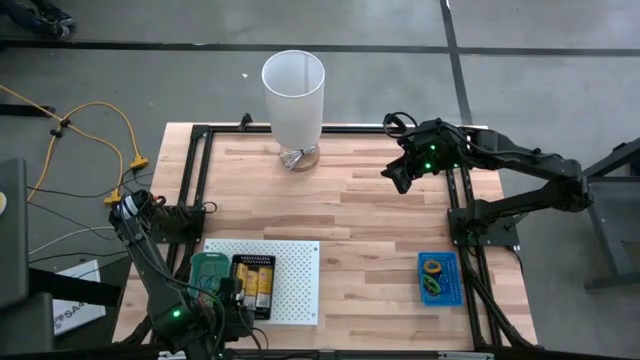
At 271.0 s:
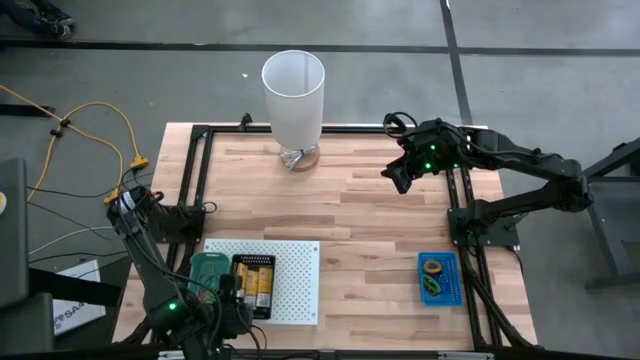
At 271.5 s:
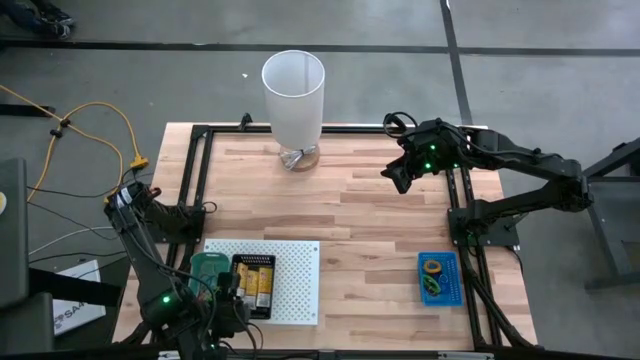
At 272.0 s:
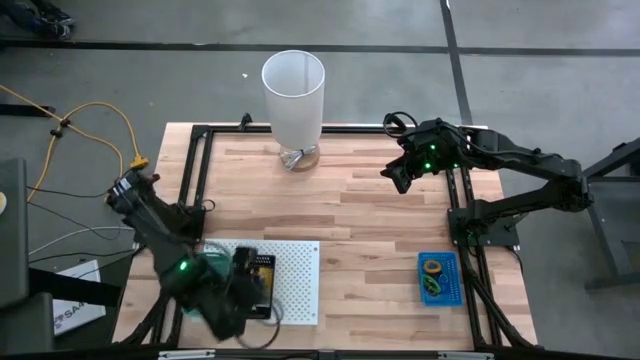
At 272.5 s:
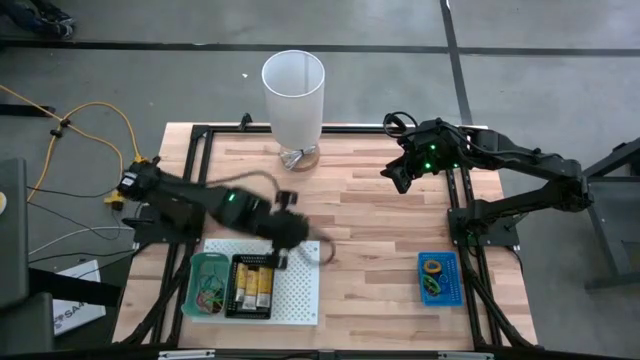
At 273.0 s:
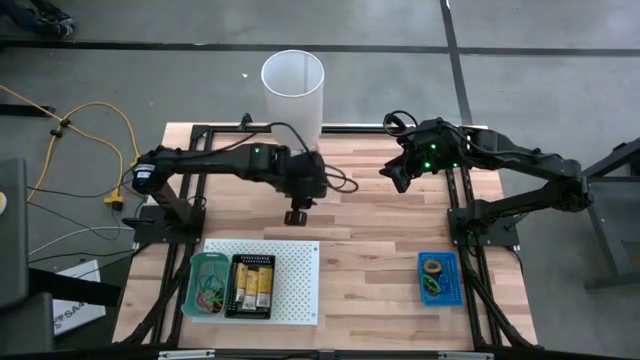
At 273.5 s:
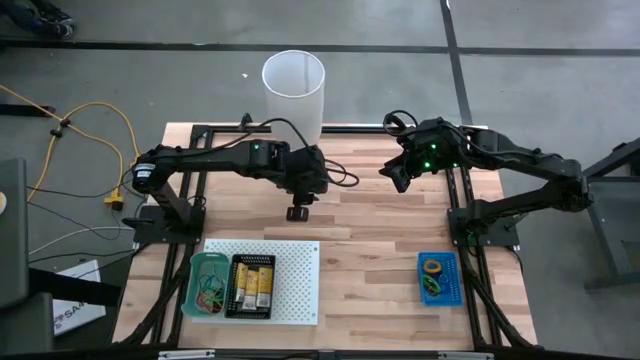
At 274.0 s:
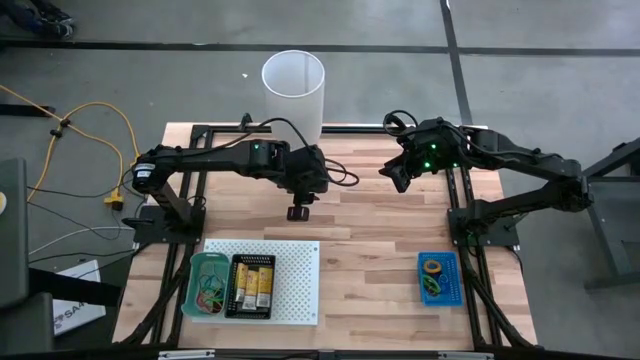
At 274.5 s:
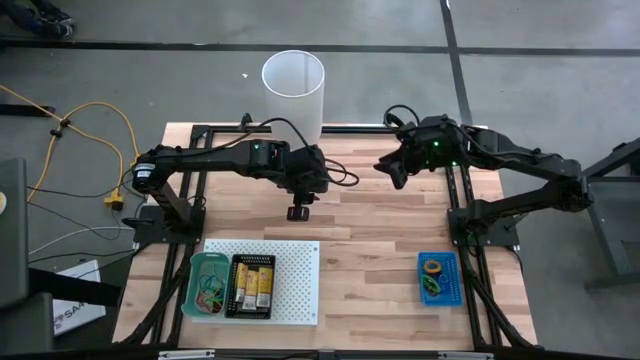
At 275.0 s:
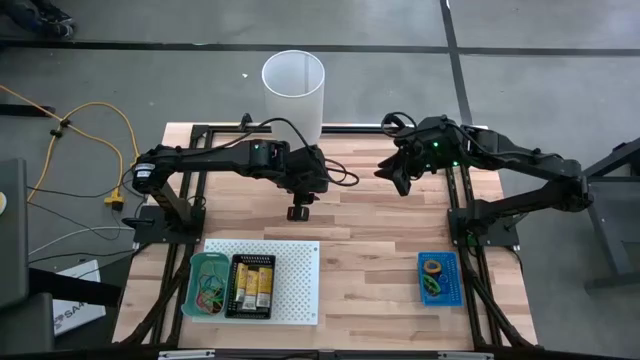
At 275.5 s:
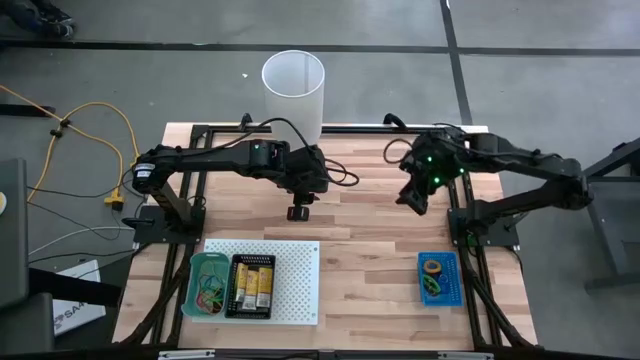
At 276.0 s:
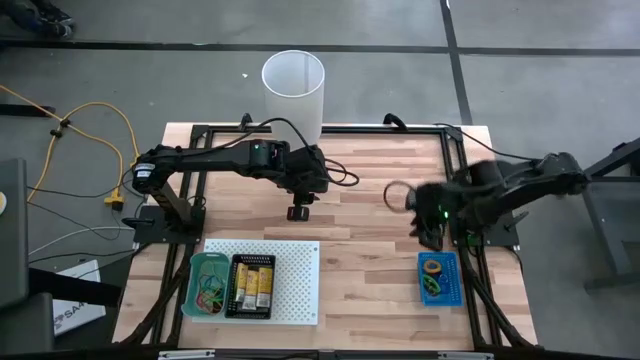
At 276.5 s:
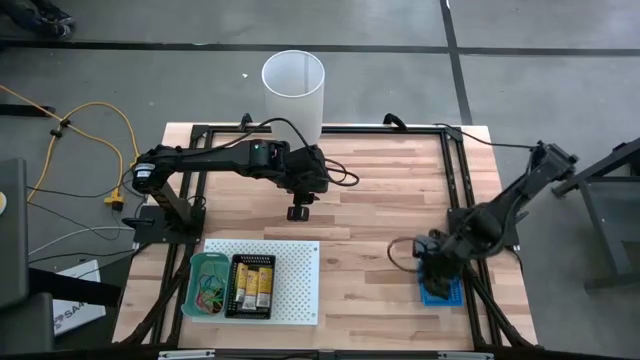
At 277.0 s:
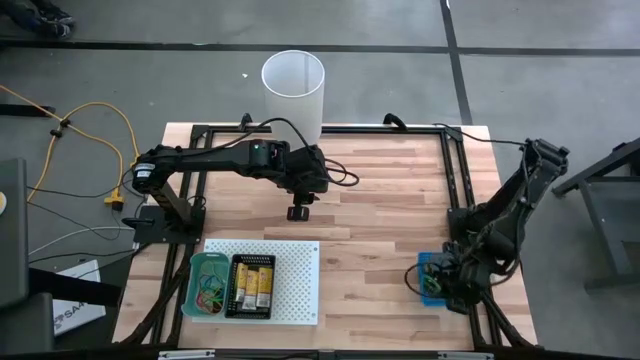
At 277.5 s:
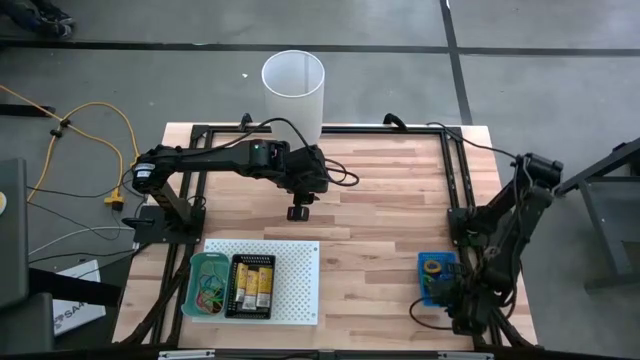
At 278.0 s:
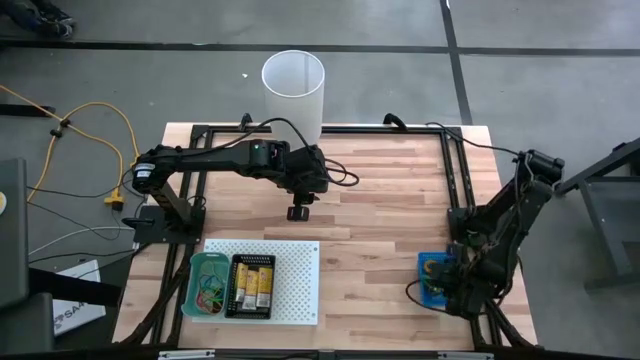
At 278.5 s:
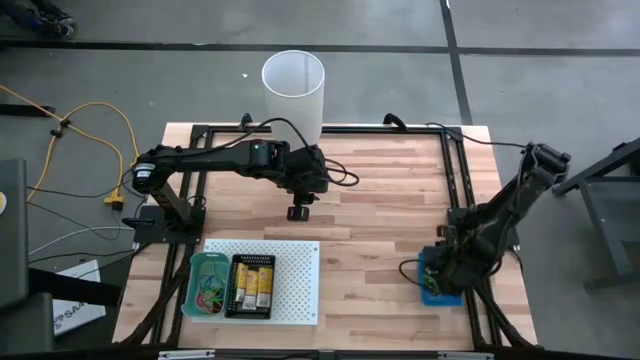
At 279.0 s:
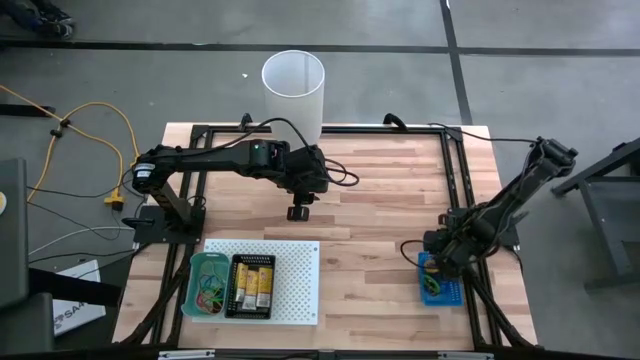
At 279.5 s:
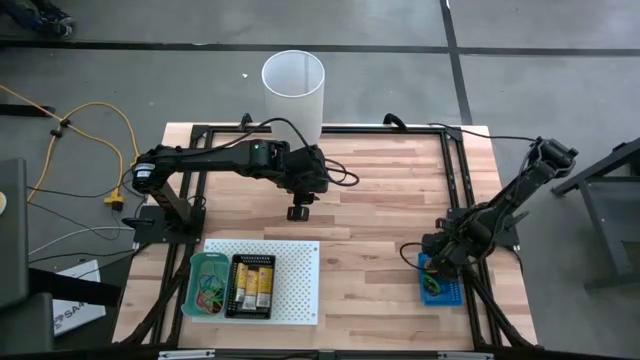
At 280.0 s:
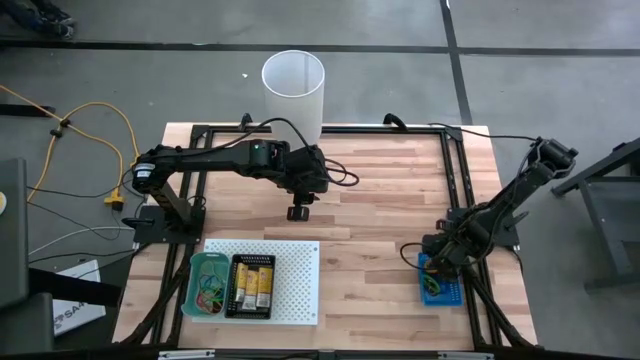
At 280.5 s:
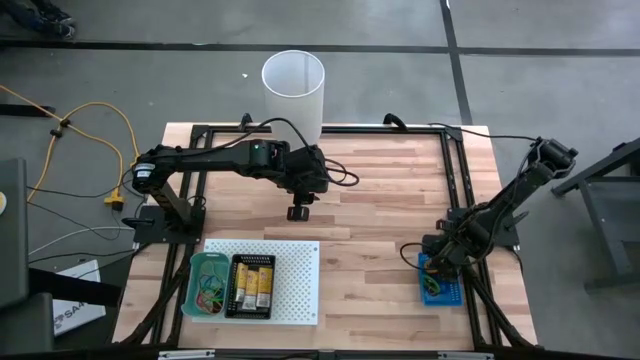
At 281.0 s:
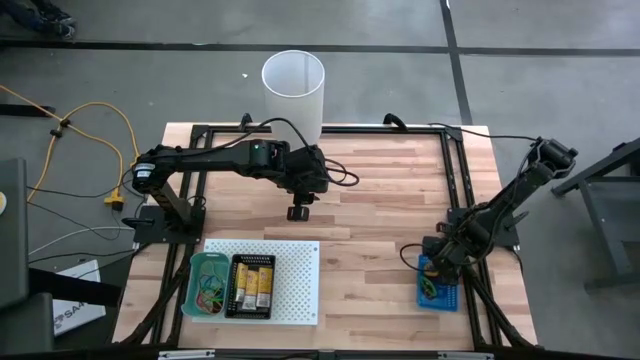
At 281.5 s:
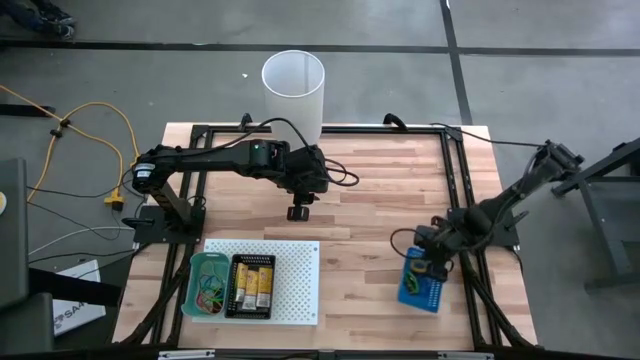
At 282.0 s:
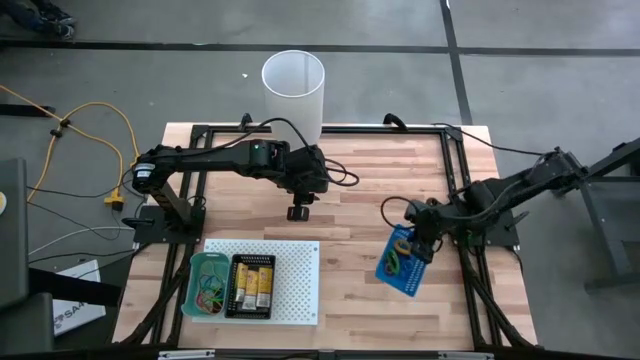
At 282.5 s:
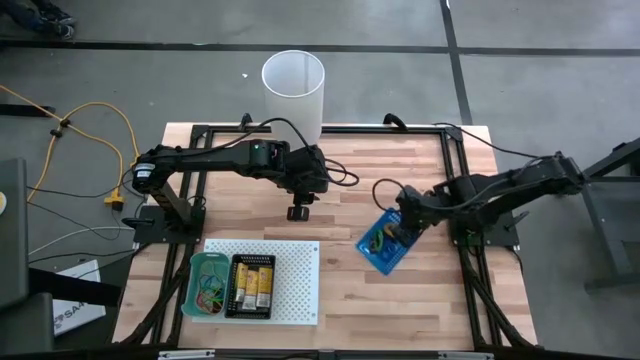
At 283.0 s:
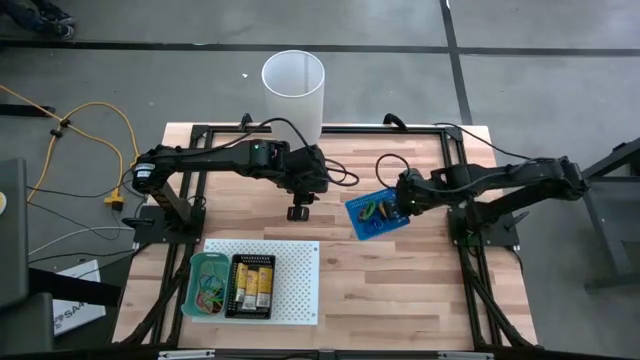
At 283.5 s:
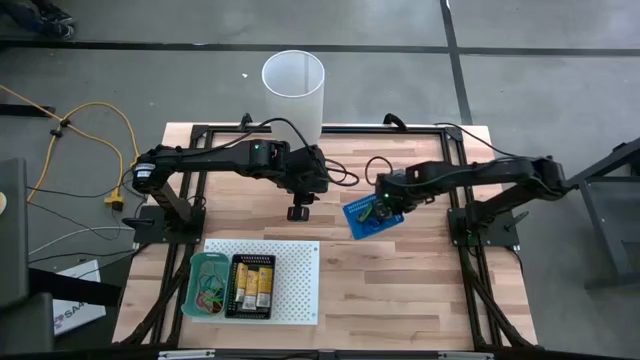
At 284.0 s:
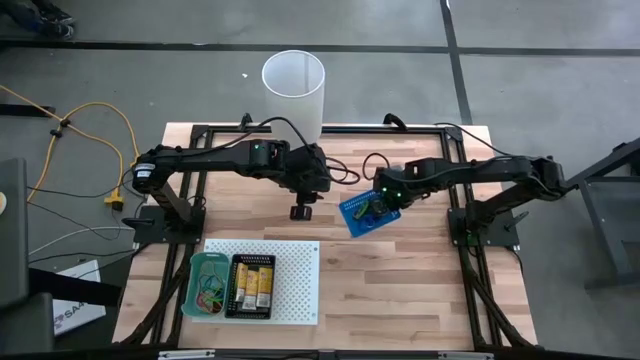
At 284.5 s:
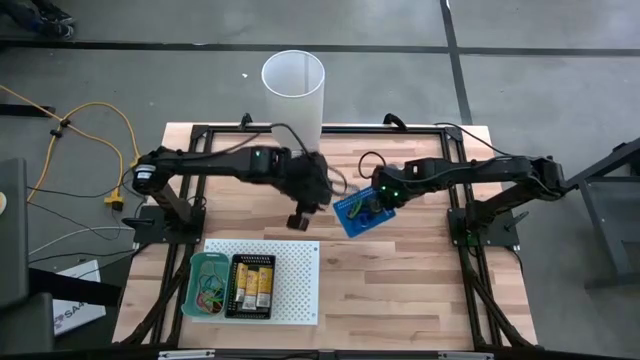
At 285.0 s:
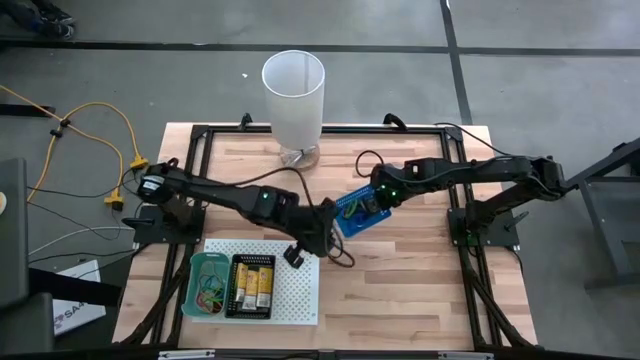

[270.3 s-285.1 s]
Task: Pick & Place Office Desk Supplies
Put the blue bin on the shelf

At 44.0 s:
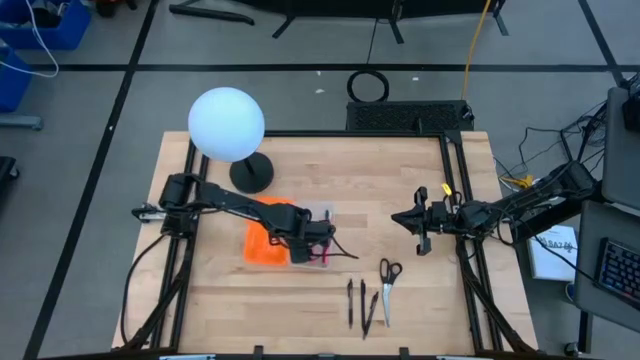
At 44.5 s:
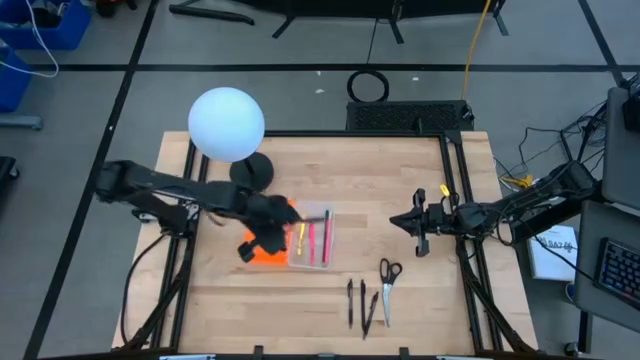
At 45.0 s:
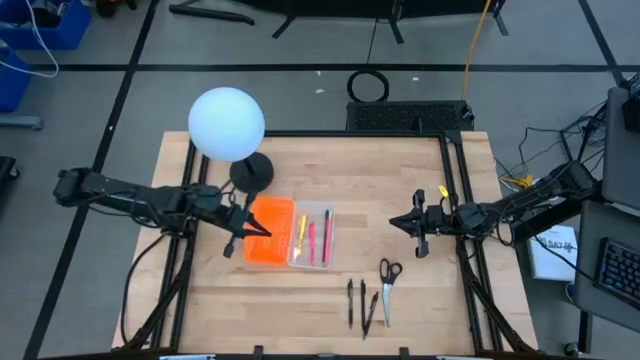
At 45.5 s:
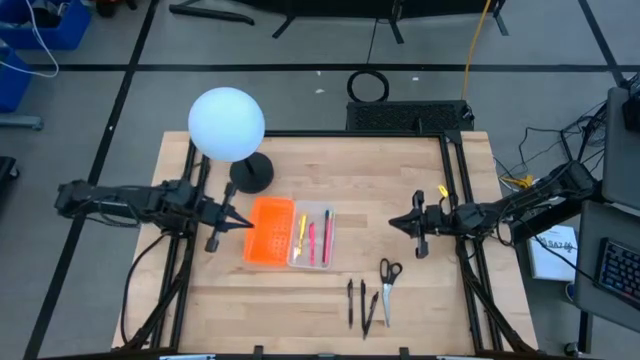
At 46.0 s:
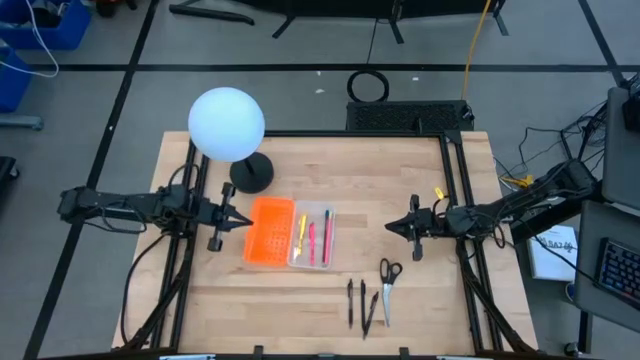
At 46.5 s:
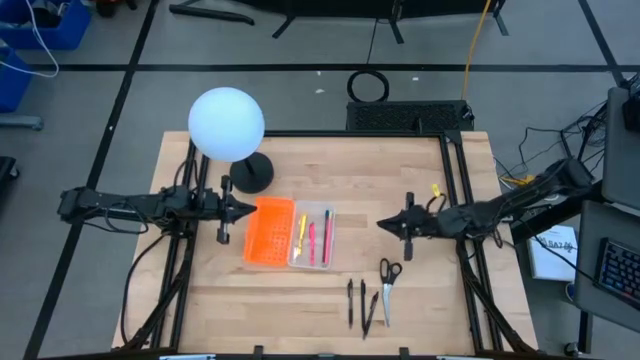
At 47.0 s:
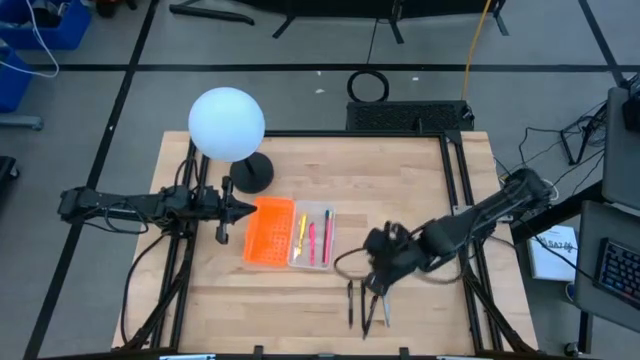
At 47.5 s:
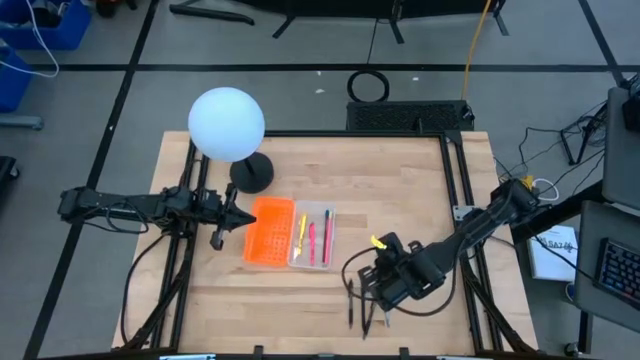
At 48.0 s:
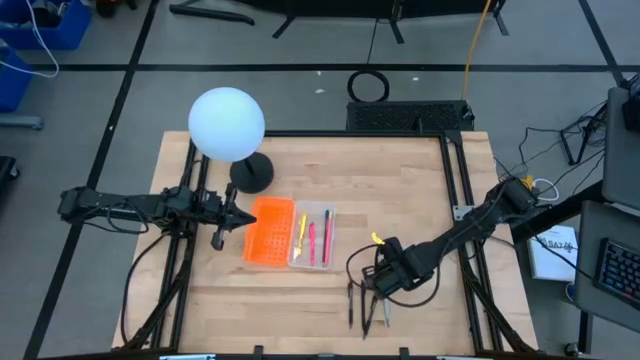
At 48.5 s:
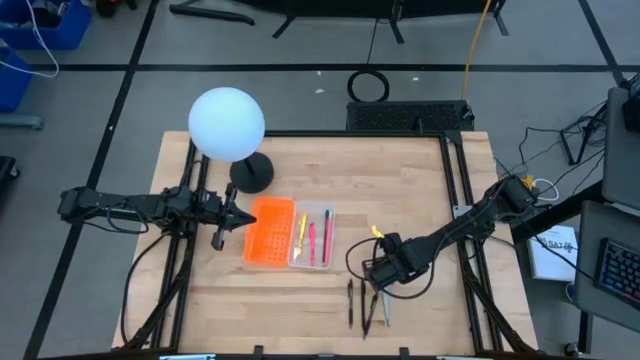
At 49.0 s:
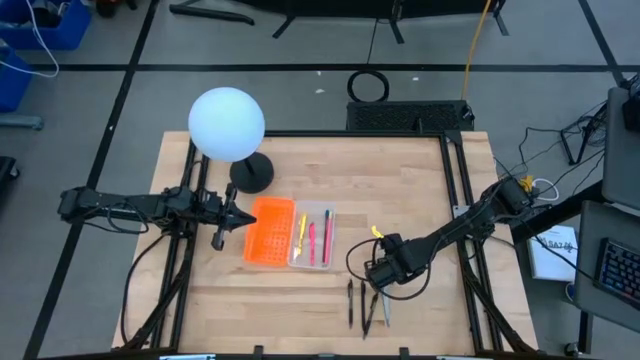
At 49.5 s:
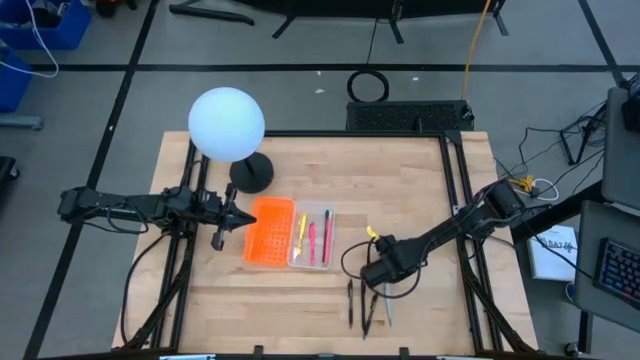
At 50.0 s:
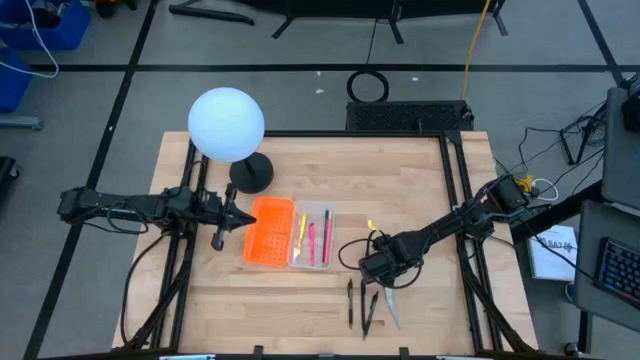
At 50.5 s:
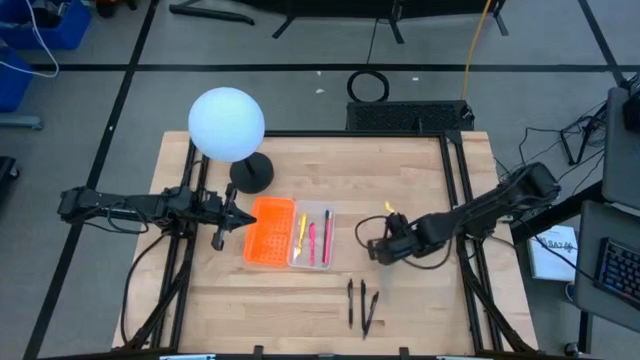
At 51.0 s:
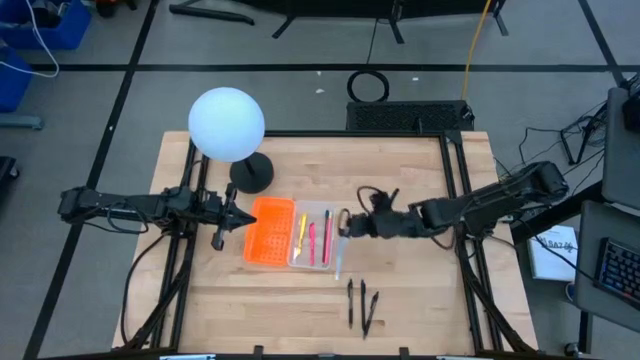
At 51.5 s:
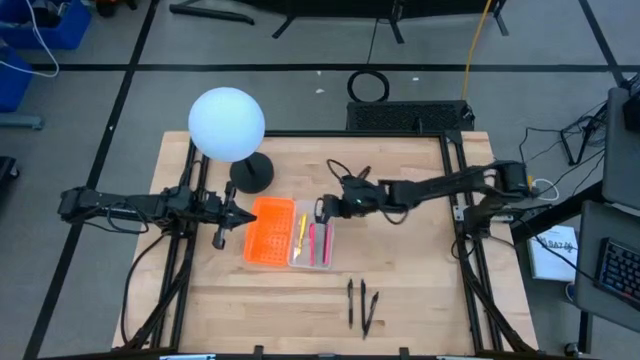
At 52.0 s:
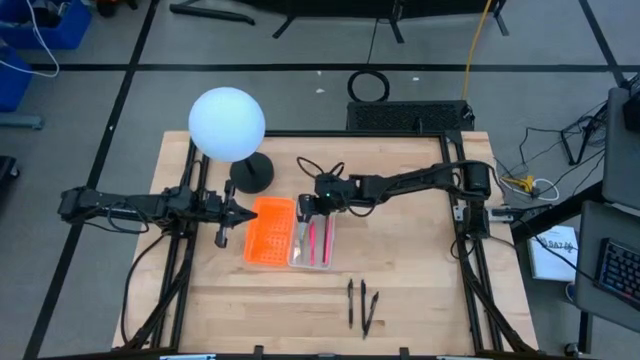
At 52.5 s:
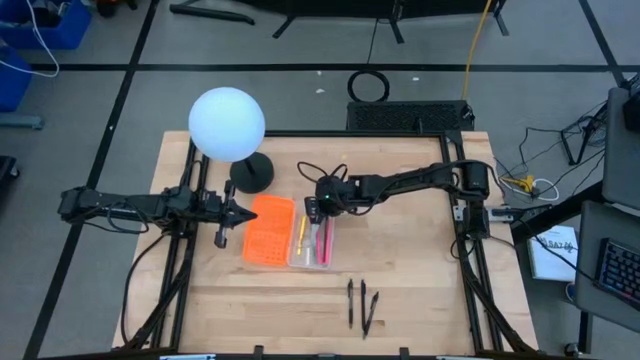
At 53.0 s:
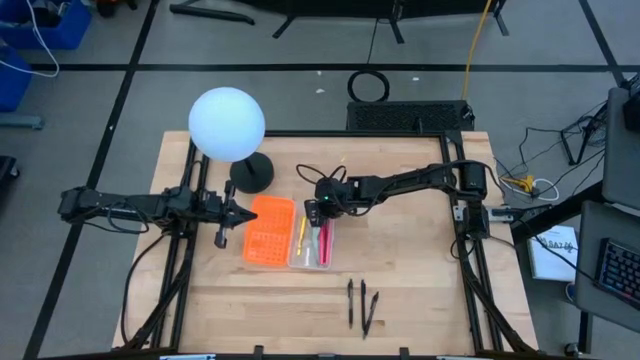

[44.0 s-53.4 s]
Task: Pick & place school supplies into a supply box
Put the black scissors into the supply box
